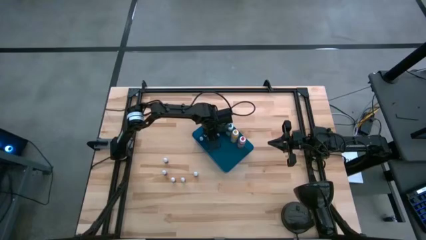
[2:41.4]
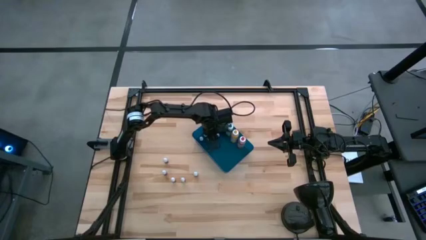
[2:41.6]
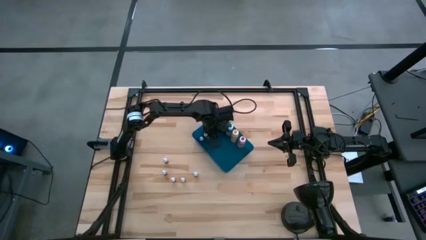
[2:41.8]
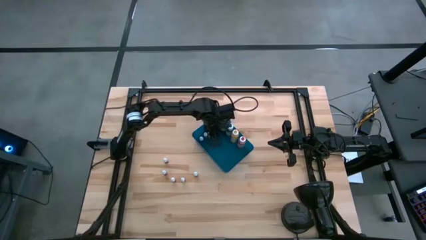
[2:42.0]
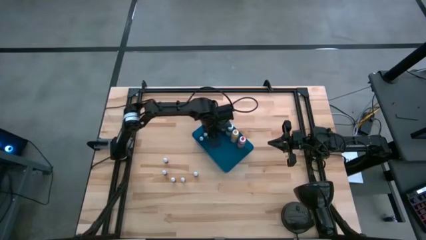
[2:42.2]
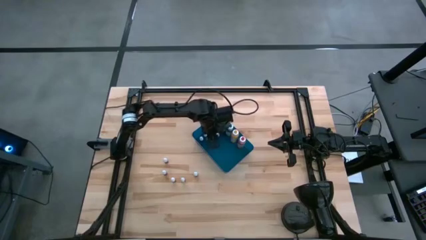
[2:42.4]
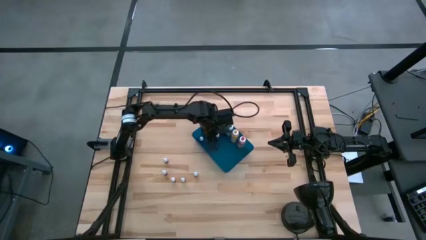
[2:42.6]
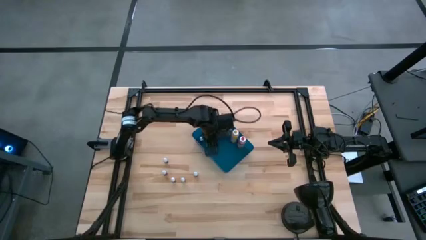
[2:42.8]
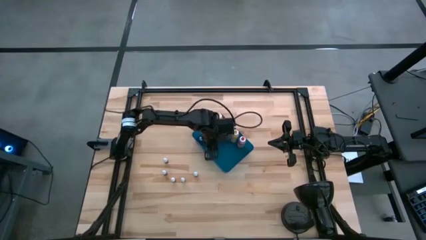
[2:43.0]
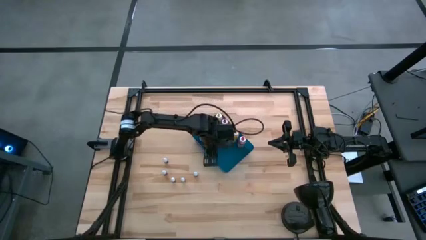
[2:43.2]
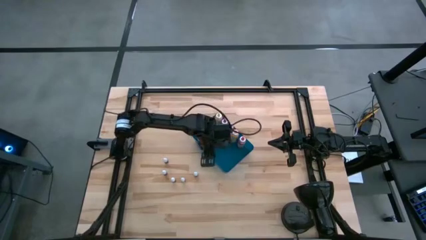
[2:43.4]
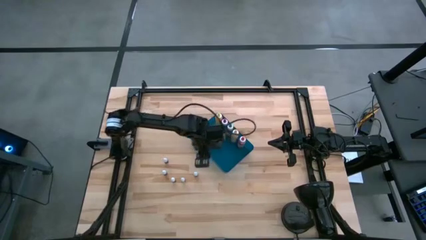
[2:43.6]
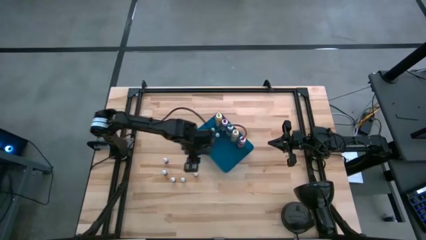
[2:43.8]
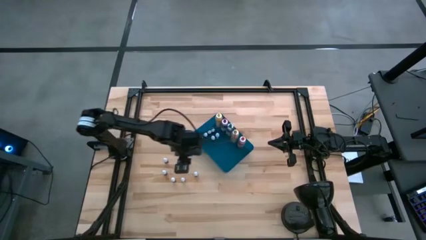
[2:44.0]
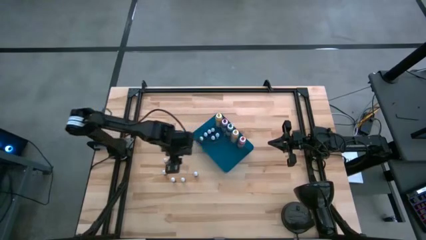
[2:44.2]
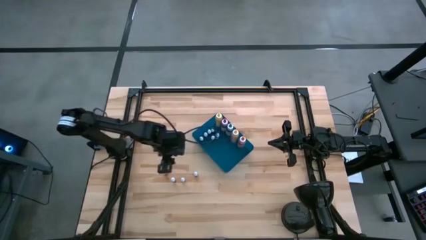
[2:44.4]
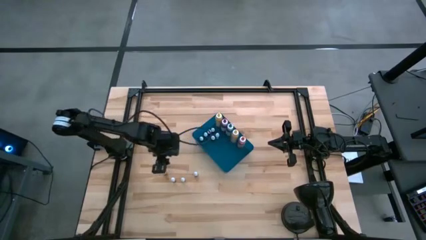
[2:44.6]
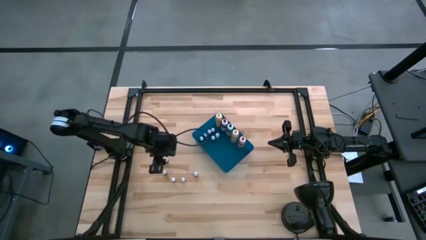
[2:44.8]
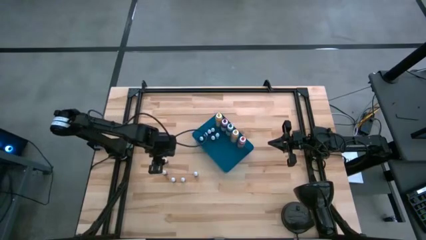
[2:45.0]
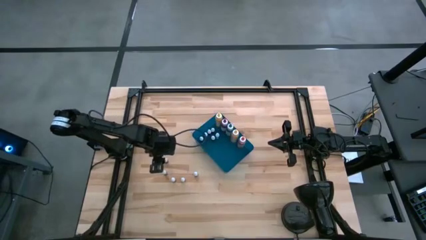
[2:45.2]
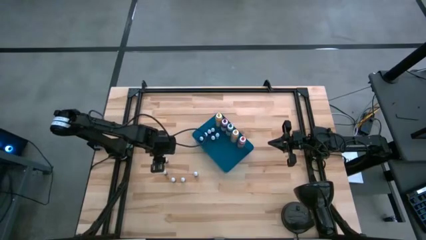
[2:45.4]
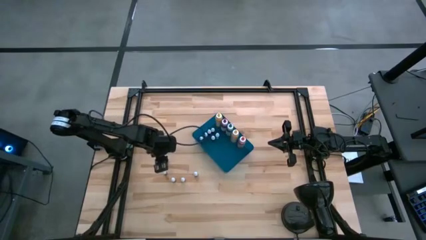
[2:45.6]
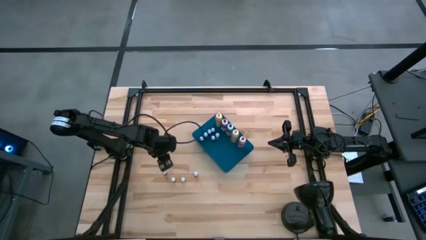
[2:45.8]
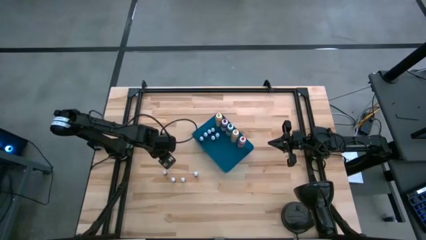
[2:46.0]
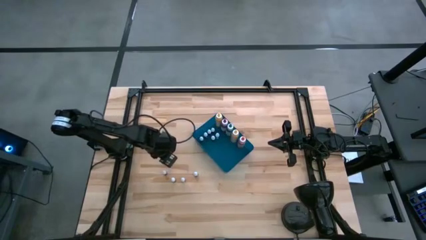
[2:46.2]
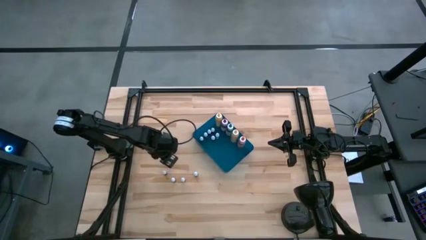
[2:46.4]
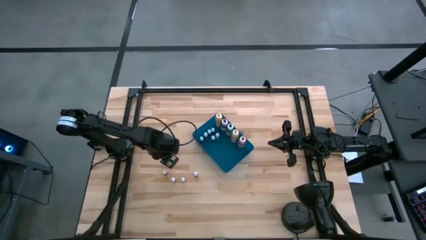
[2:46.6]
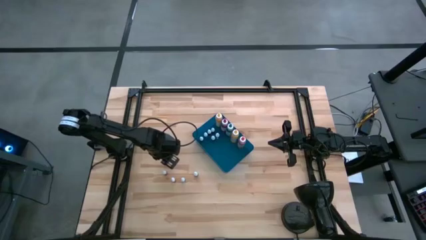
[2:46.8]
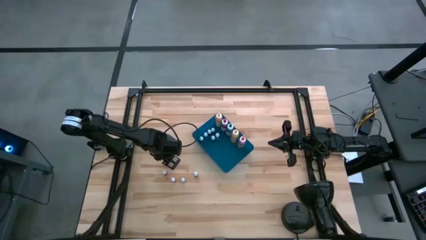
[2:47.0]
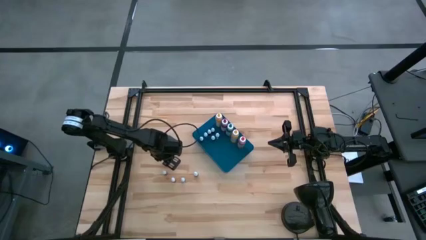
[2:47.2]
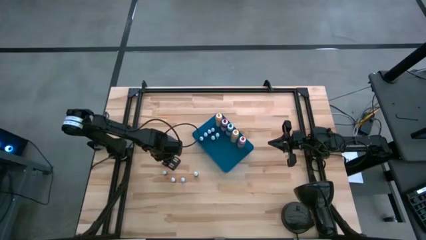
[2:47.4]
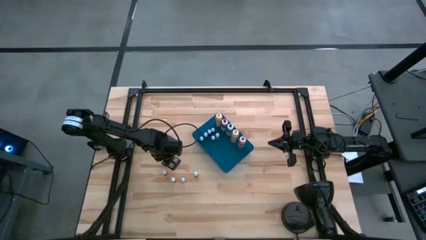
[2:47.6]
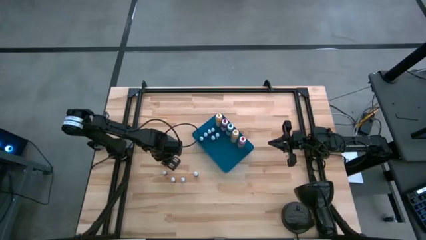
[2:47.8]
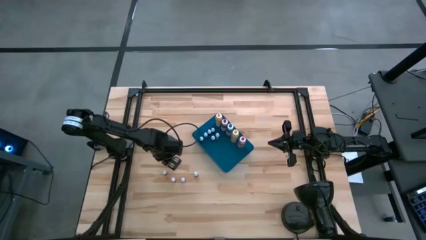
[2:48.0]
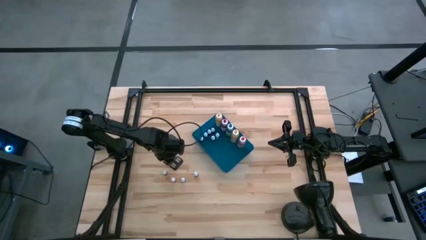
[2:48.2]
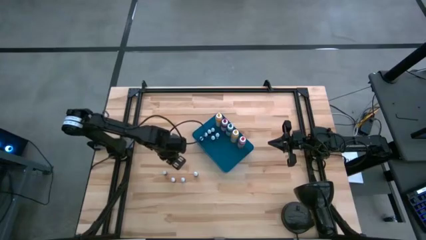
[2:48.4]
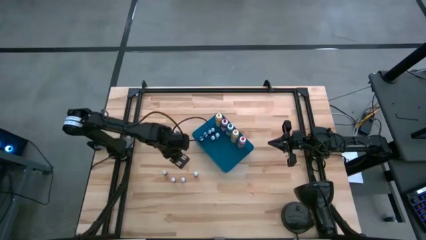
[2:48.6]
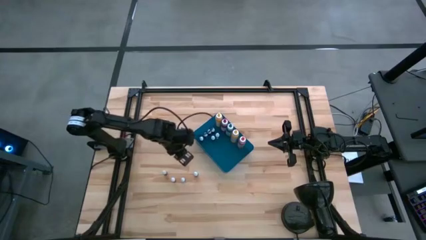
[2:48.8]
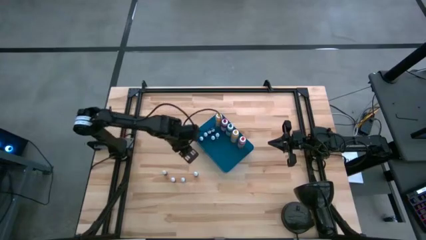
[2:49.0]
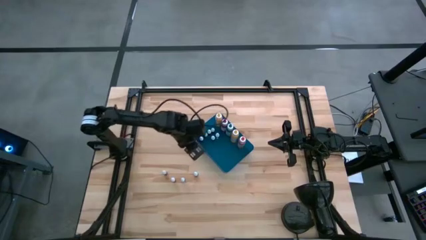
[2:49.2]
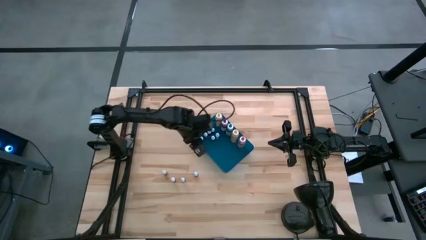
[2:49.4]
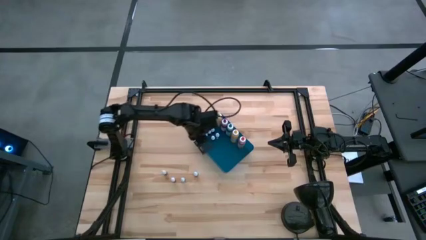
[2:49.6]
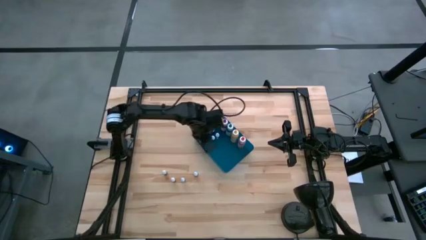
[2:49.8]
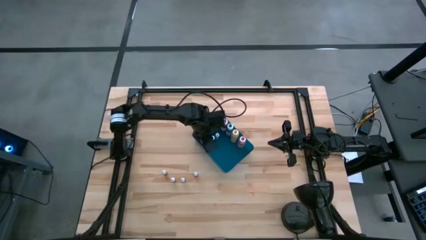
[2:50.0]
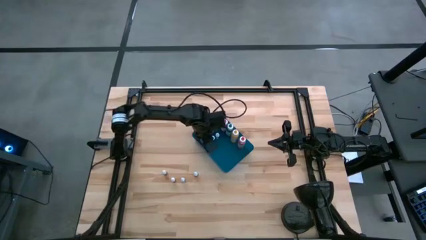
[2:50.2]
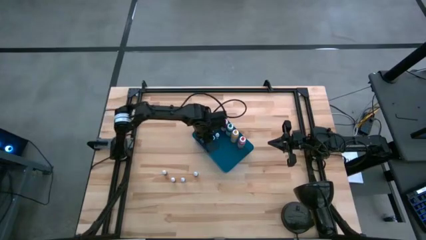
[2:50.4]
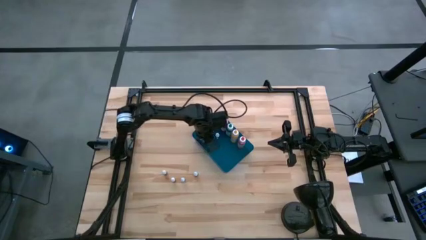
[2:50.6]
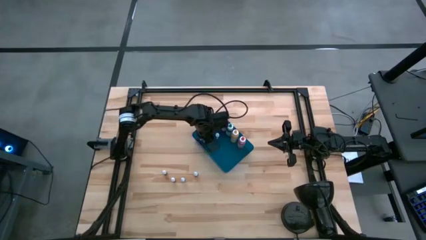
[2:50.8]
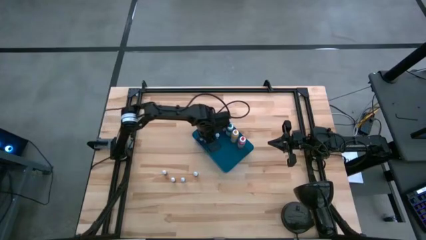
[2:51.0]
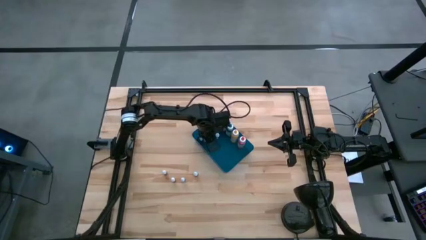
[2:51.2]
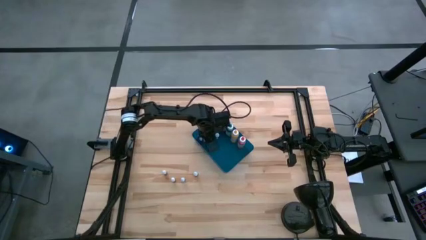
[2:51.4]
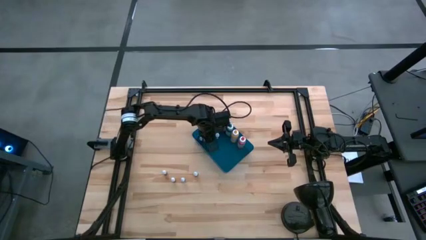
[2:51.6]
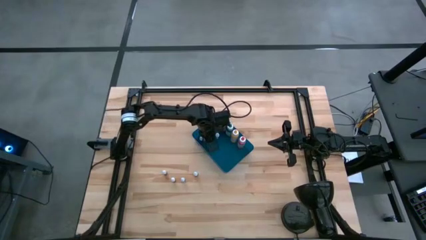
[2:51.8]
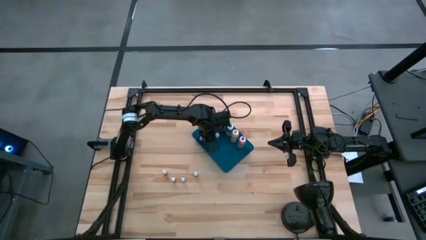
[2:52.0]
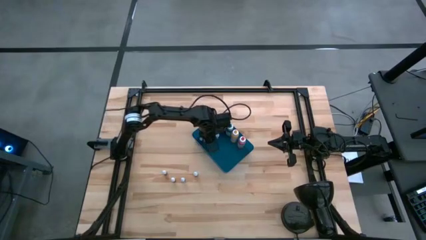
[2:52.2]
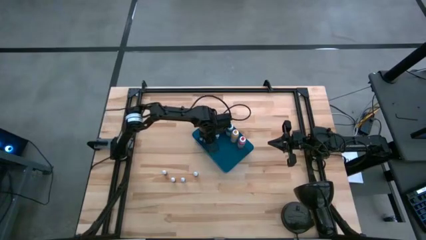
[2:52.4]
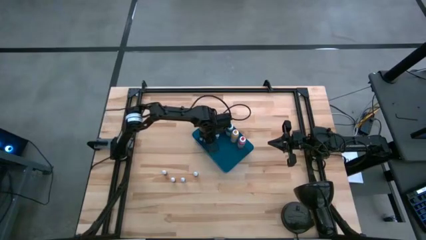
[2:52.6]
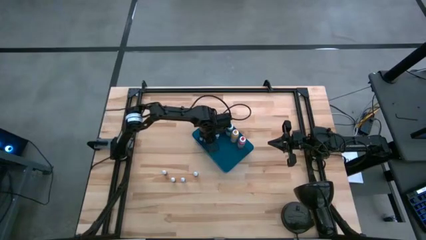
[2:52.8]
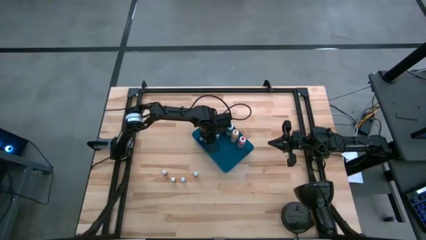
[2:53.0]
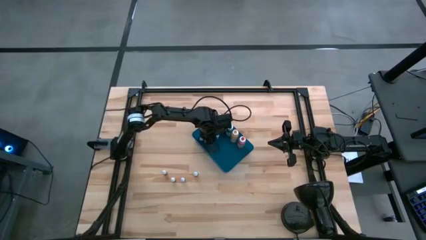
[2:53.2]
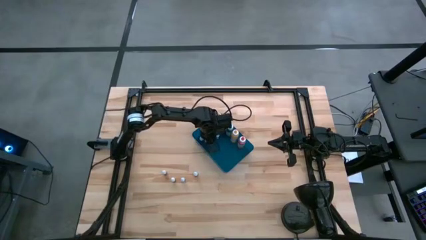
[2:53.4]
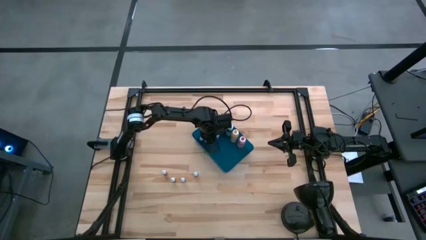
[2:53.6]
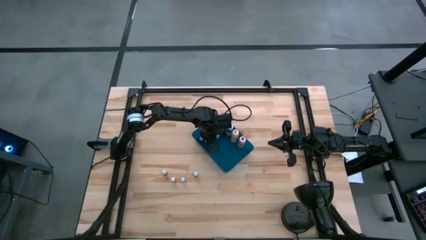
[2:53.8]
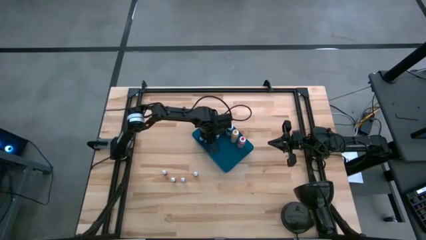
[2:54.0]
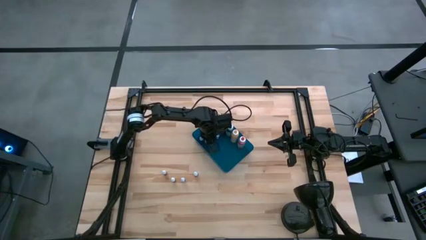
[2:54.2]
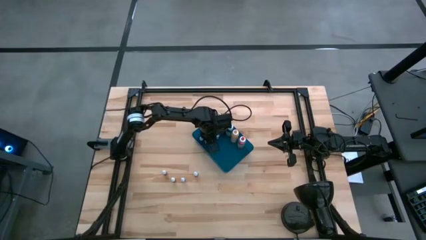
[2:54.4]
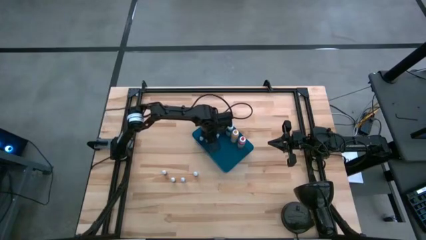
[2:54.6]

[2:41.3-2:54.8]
Task: Pick & Place food coloring
Put the blue food coloring bottle into the blue bin

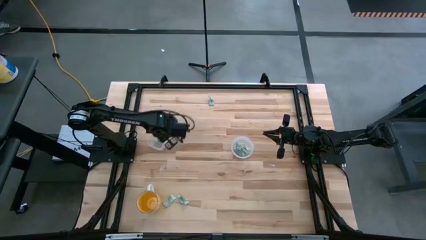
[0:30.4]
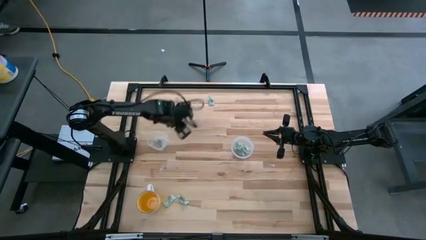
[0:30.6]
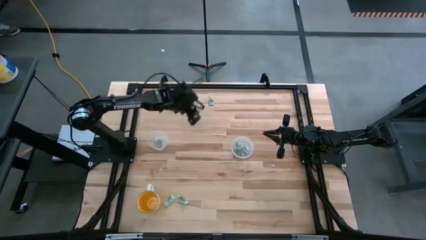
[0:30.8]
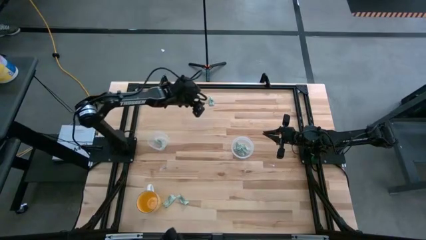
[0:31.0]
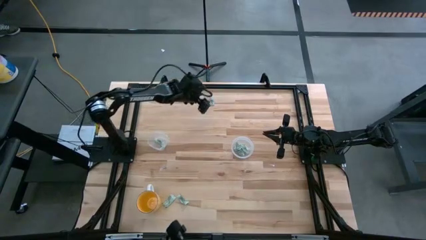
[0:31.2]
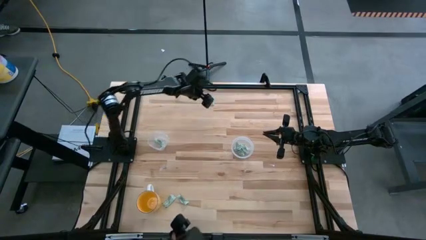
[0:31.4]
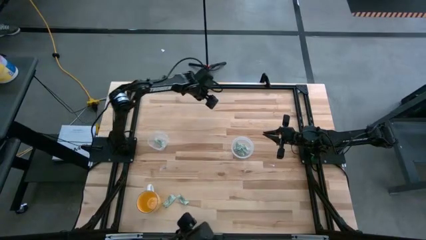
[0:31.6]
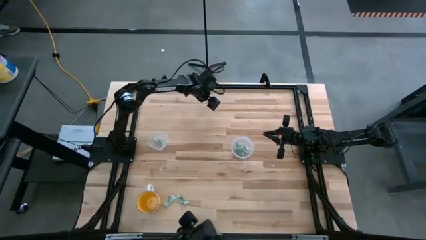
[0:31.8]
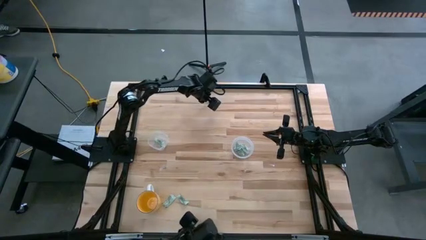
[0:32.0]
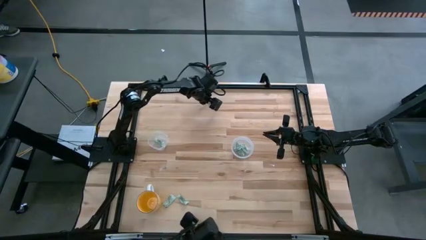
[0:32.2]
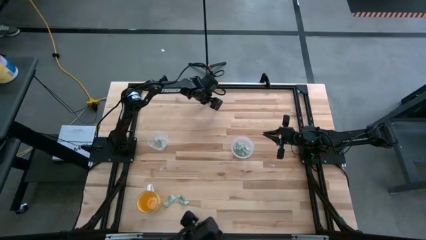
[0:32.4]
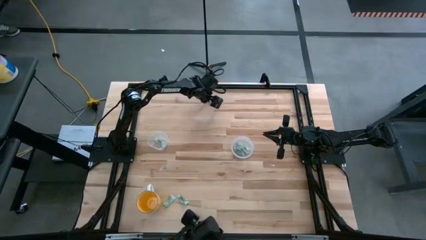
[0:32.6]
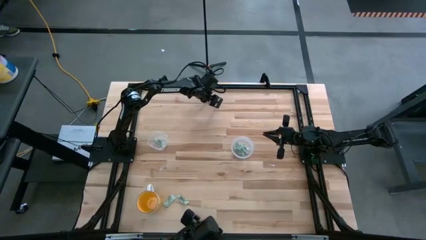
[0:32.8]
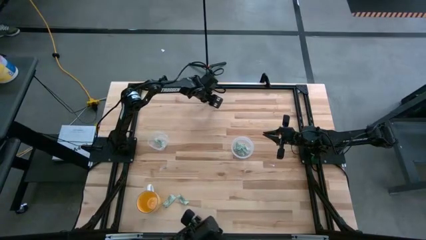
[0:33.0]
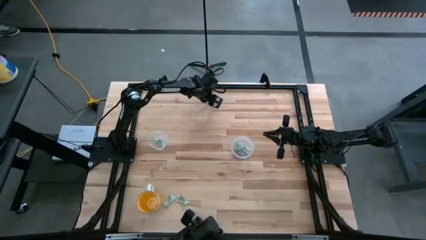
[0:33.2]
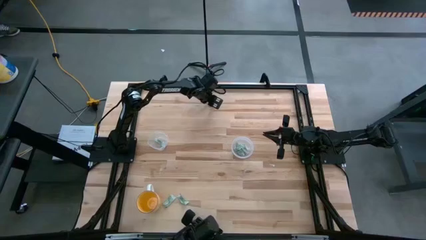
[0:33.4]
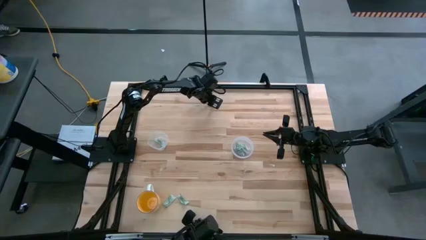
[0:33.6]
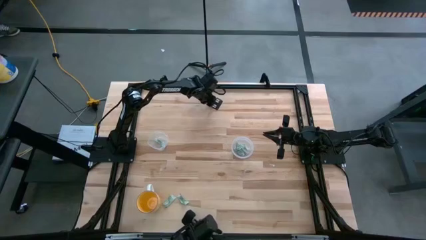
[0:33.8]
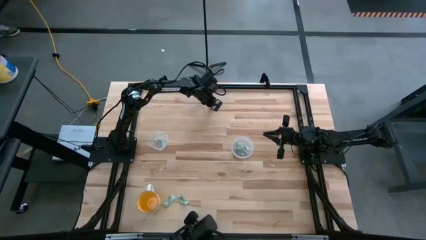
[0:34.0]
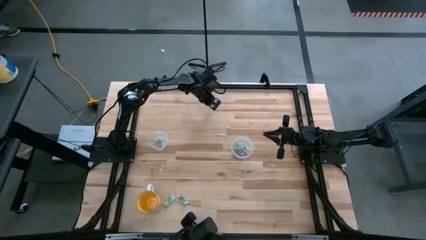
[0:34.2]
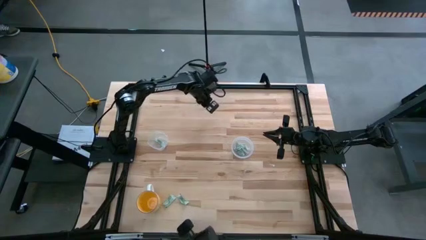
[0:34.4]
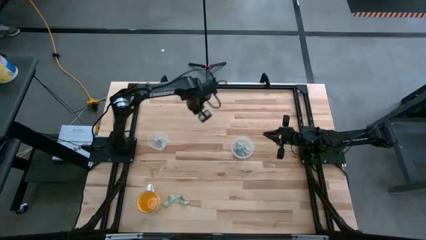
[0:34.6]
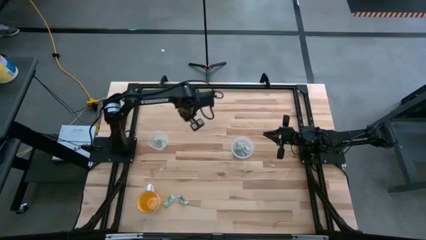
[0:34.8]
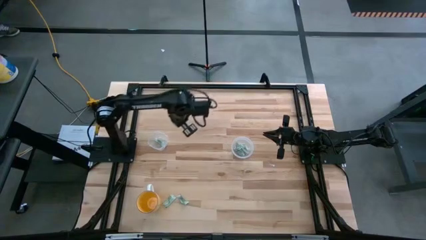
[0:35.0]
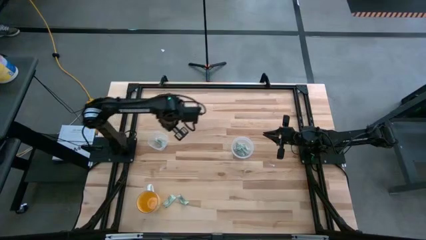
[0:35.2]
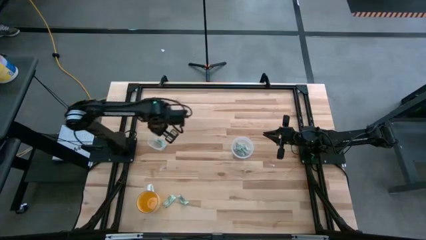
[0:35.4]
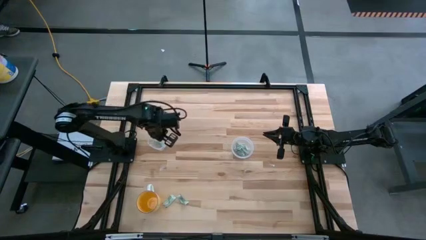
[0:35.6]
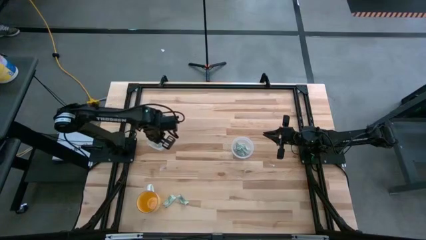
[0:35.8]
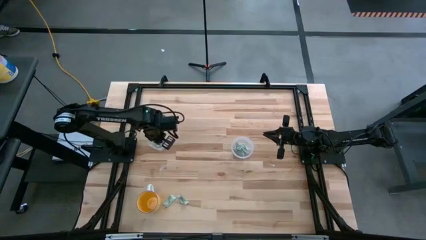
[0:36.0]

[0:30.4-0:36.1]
Task: Pick and place items into bin
Put the stevia pack into the left transparent bin
